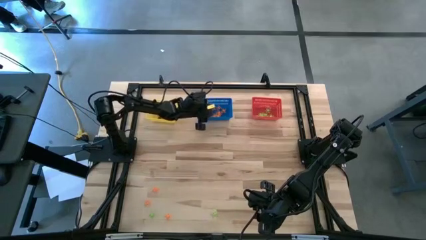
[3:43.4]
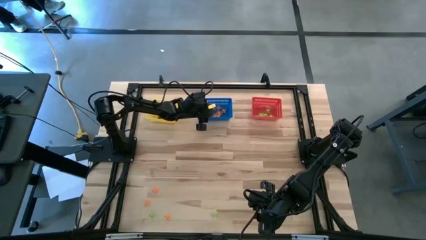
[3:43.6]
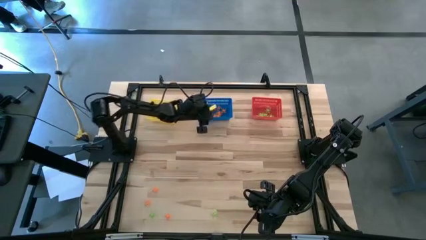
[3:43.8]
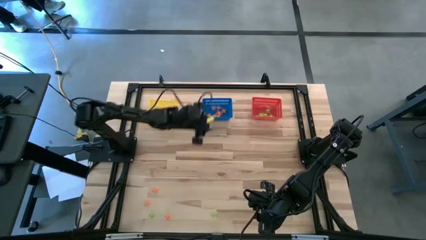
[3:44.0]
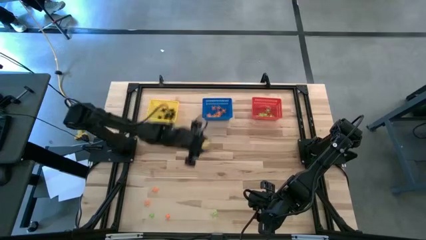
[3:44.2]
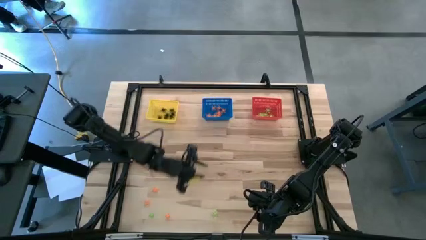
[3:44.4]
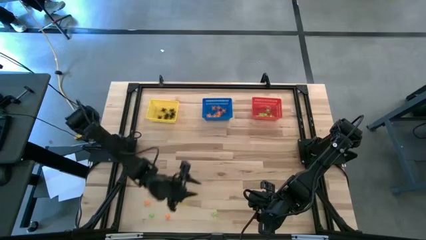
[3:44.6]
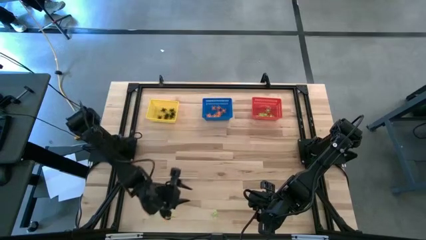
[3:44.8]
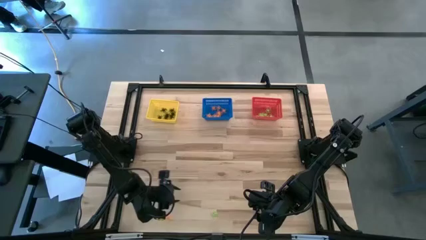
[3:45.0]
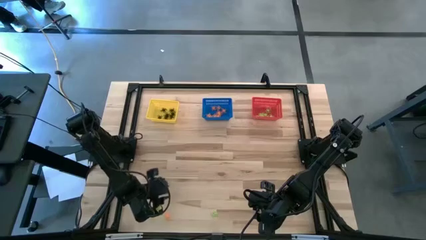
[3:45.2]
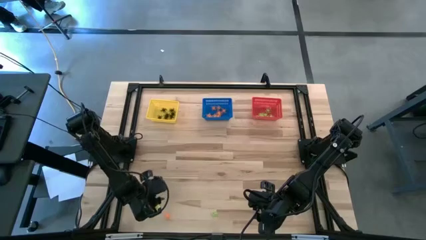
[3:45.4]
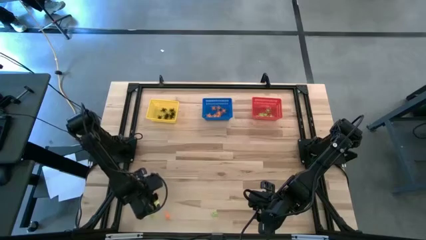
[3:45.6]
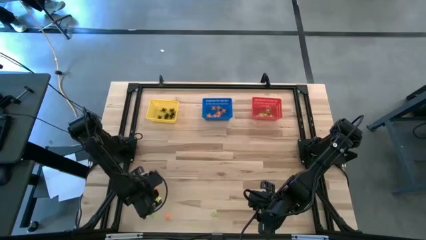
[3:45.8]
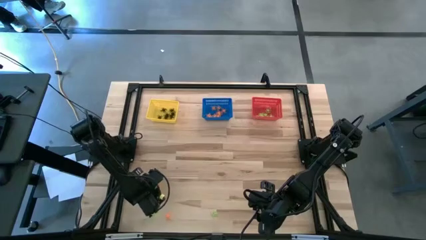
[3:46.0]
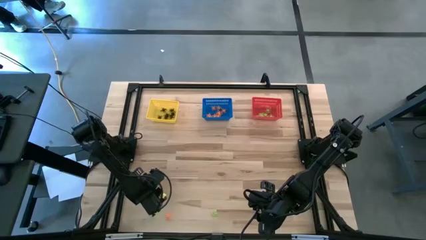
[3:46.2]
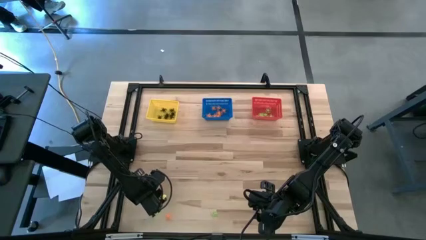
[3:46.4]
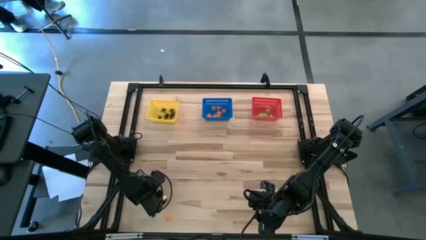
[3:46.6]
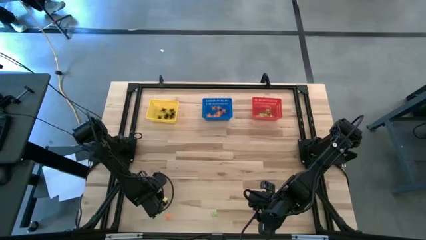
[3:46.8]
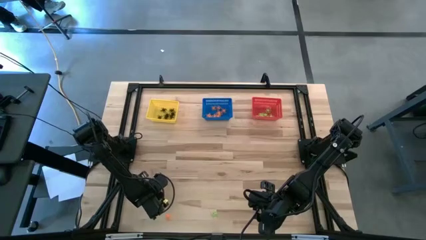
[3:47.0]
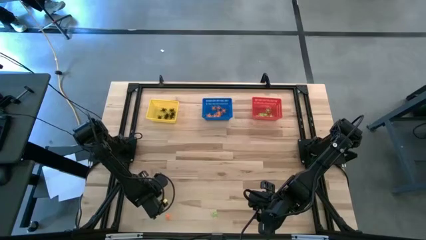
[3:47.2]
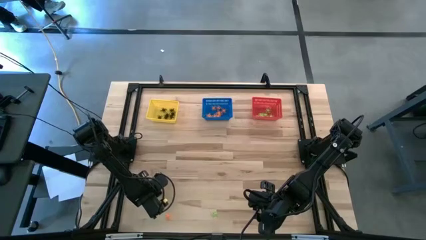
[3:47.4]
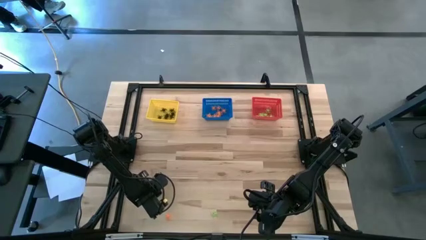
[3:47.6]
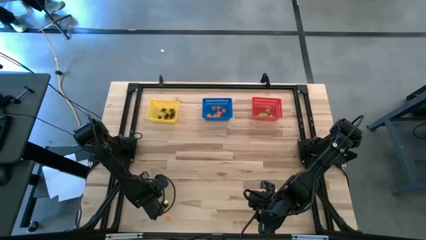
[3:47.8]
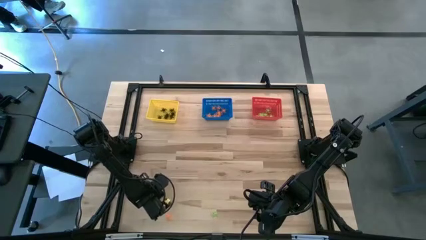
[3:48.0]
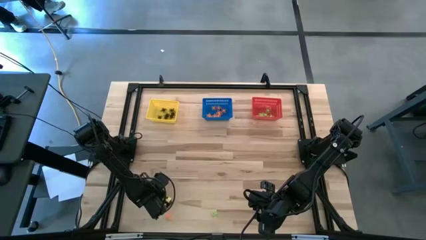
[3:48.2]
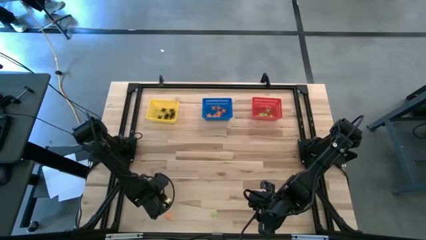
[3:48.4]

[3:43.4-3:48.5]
Task: Sort Halloween decoration
Put the orange spider toy into the blue basket

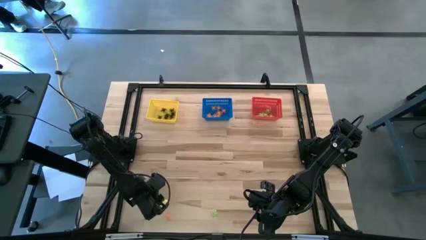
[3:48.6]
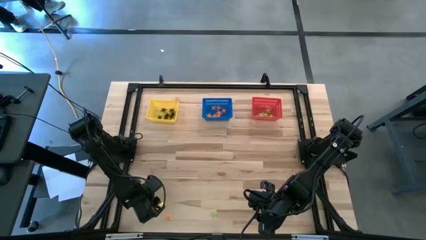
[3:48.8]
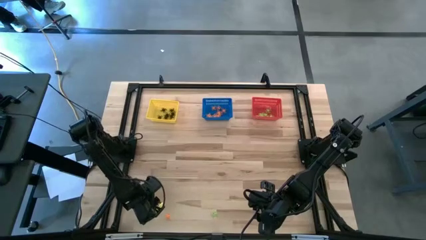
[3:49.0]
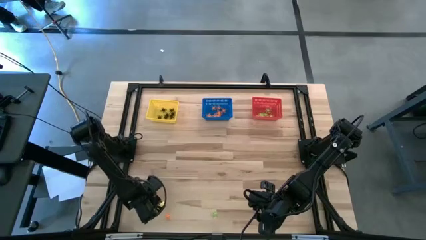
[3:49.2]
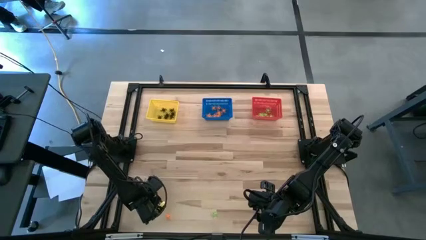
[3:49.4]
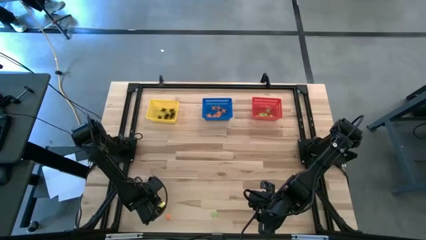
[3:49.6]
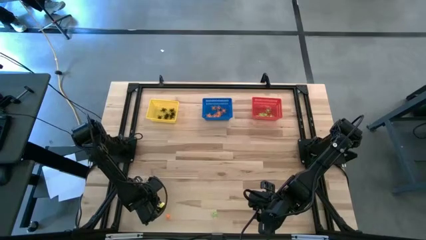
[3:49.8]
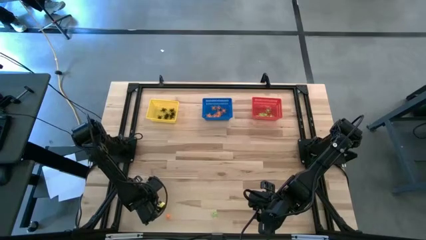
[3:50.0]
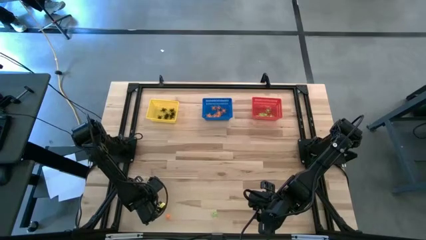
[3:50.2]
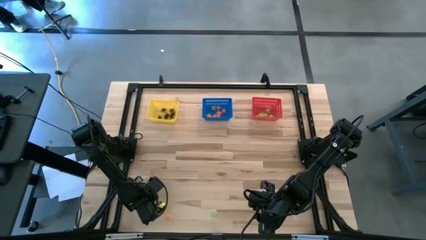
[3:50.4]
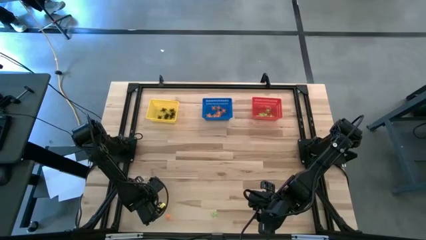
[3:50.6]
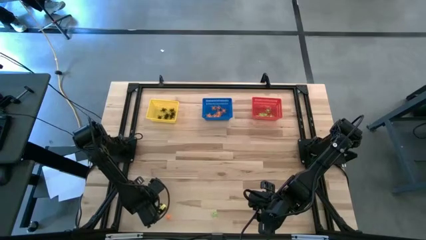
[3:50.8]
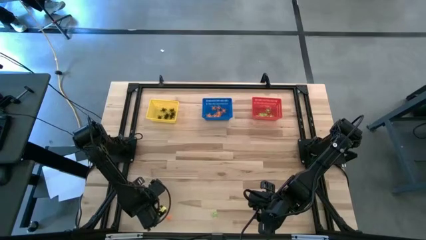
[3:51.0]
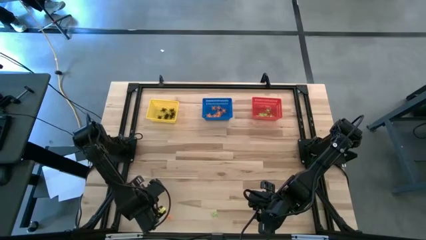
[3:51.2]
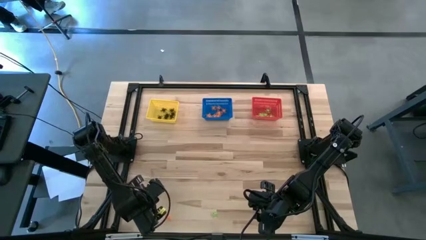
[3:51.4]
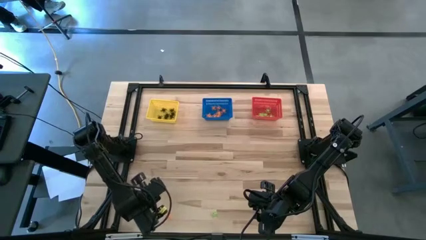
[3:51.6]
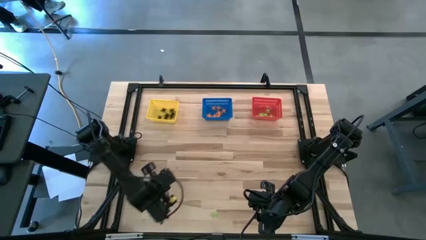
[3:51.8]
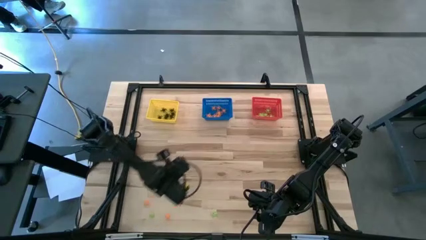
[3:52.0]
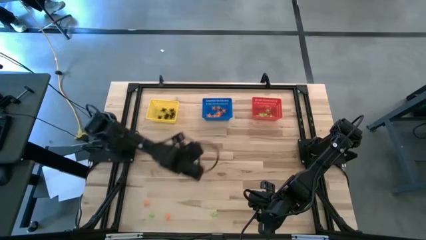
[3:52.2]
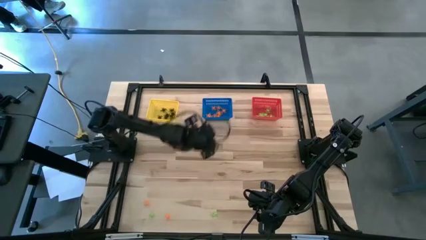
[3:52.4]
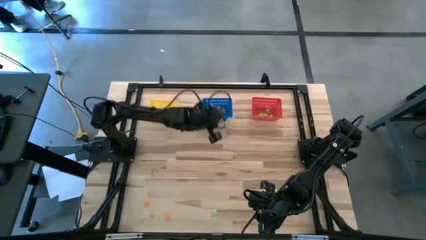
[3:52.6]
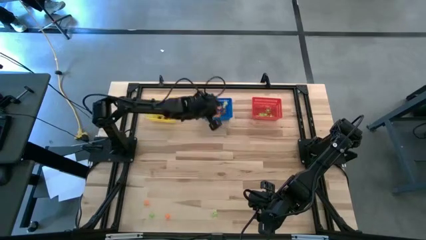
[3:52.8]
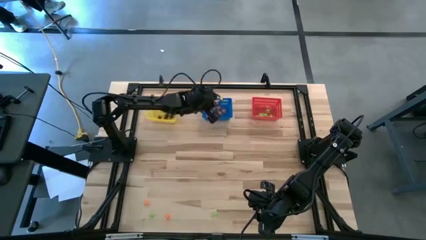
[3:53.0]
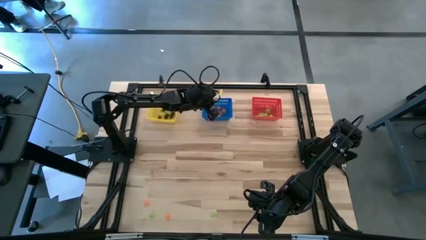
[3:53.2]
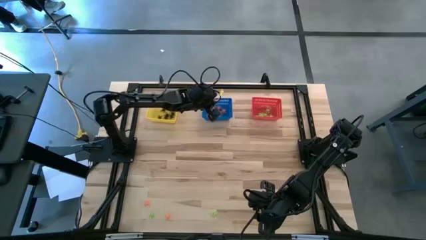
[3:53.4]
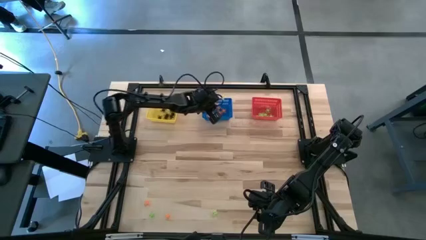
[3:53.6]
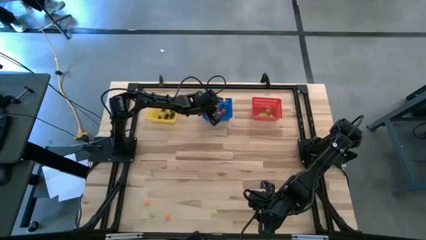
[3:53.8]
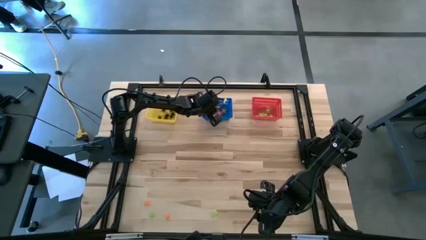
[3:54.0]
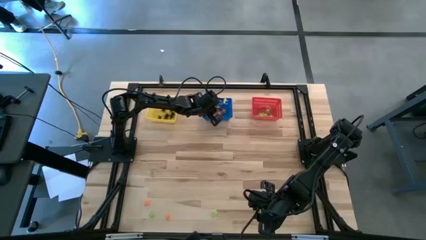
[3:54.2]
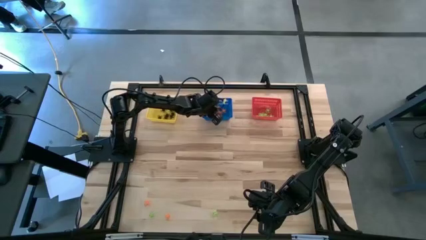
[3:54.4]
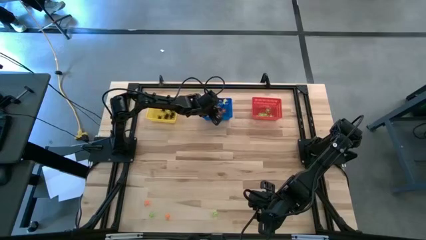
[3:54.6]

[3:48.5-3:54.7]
Put the orange spider toy into the blue basket
